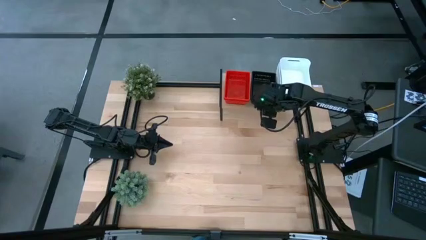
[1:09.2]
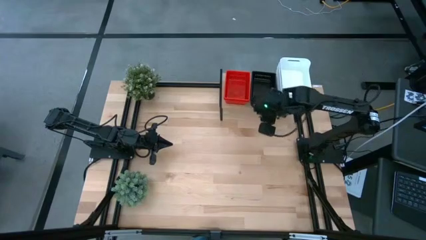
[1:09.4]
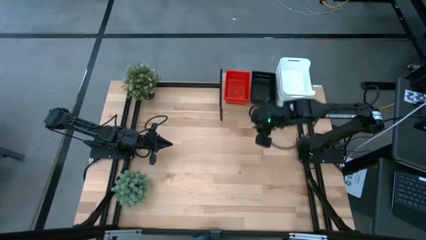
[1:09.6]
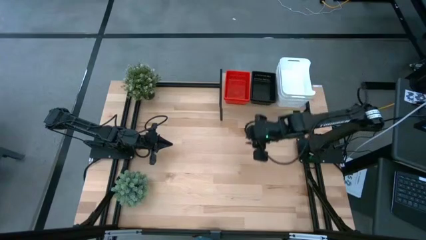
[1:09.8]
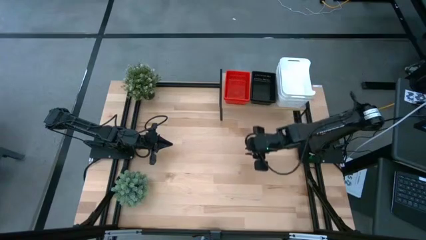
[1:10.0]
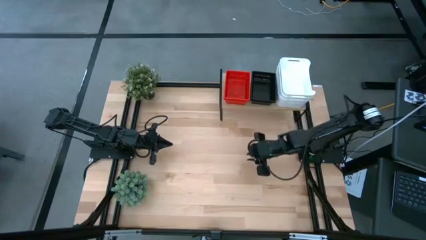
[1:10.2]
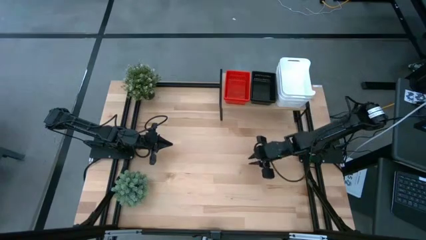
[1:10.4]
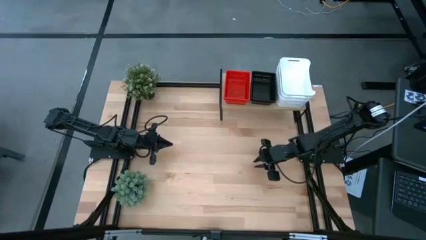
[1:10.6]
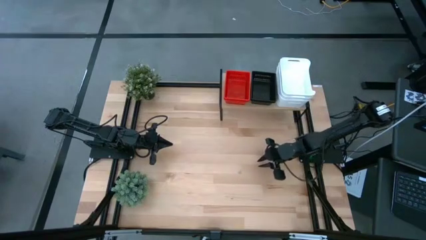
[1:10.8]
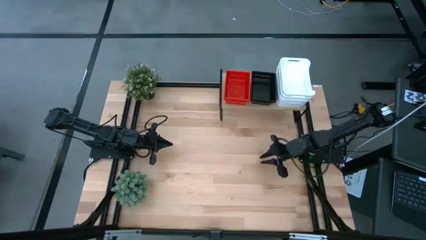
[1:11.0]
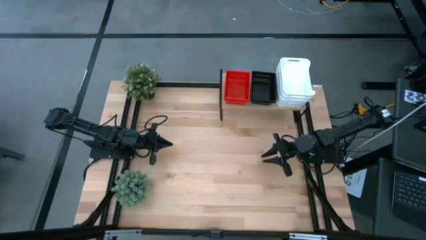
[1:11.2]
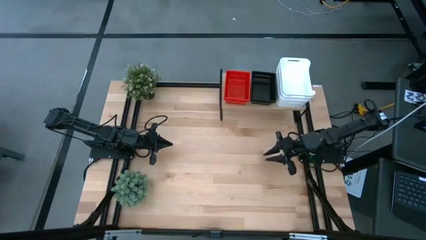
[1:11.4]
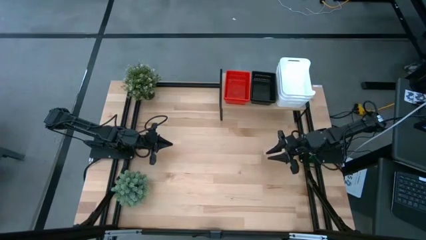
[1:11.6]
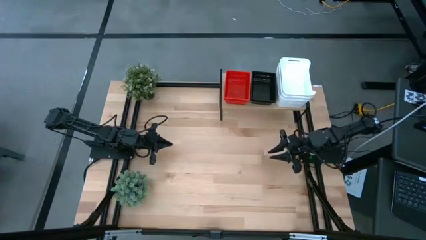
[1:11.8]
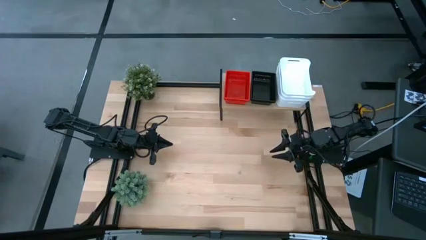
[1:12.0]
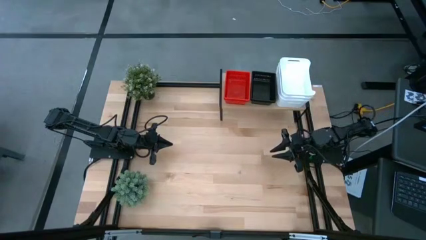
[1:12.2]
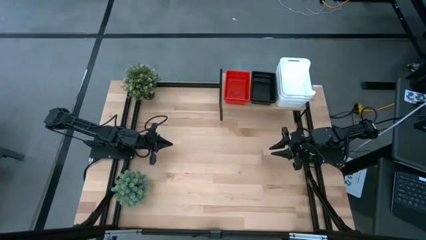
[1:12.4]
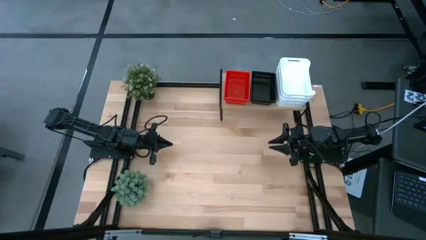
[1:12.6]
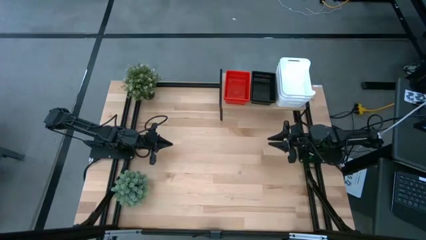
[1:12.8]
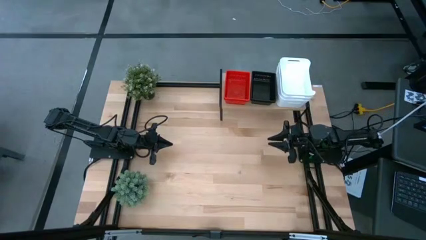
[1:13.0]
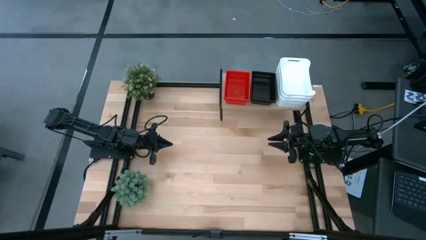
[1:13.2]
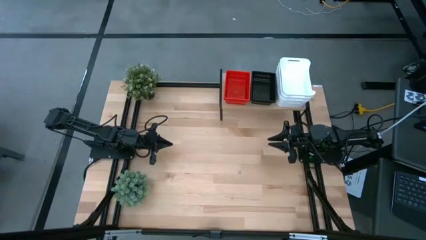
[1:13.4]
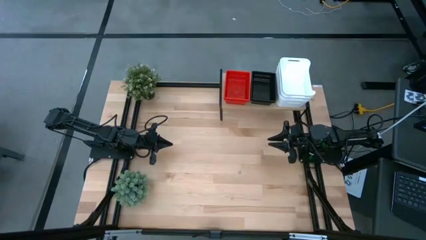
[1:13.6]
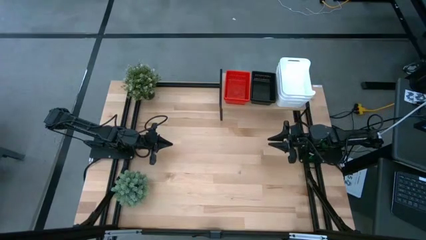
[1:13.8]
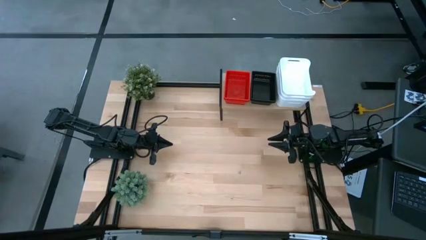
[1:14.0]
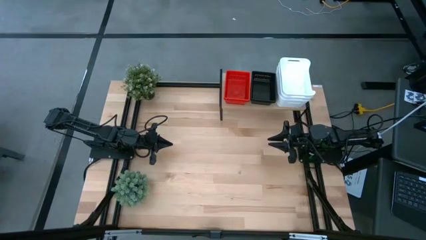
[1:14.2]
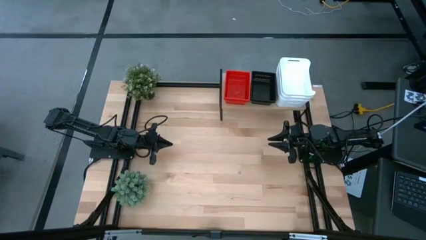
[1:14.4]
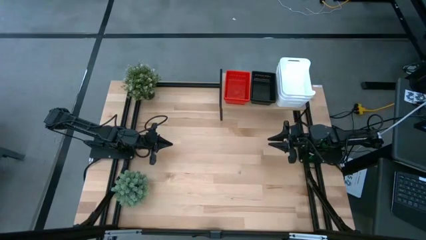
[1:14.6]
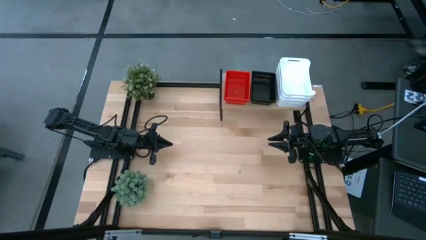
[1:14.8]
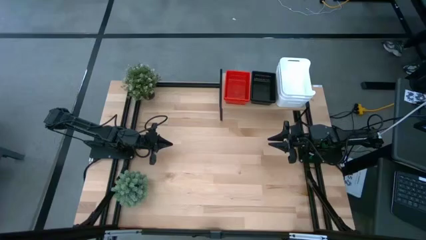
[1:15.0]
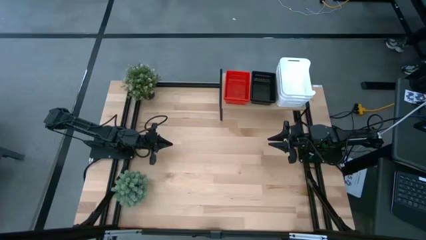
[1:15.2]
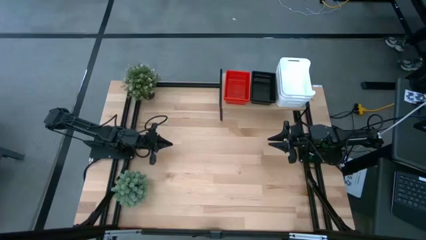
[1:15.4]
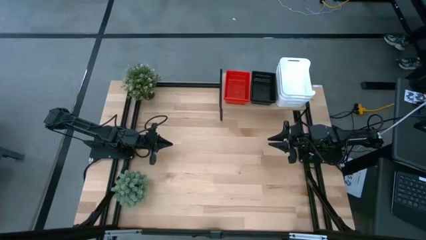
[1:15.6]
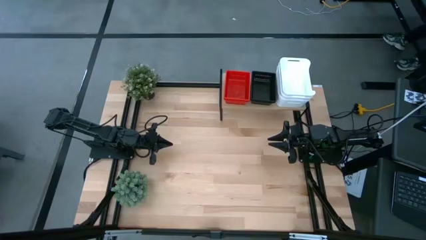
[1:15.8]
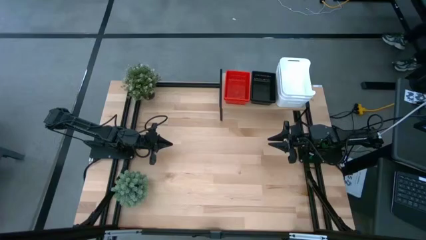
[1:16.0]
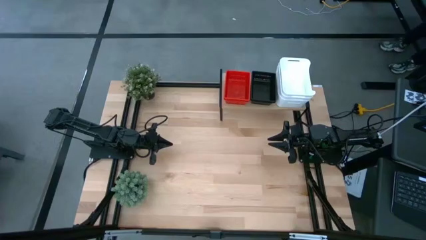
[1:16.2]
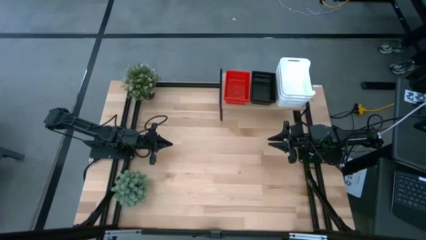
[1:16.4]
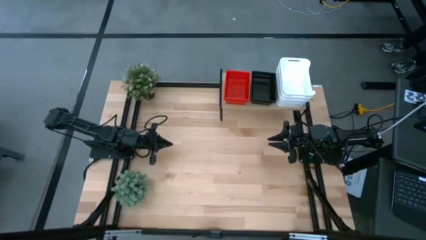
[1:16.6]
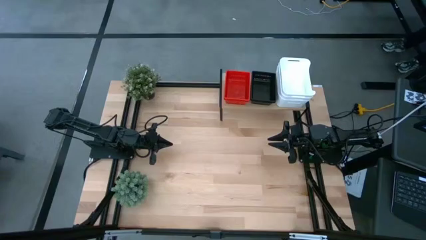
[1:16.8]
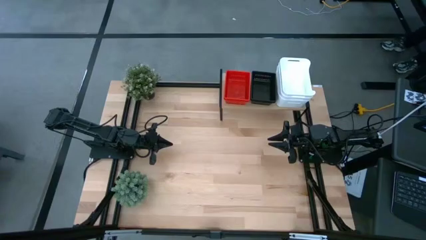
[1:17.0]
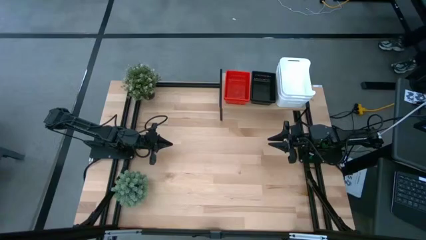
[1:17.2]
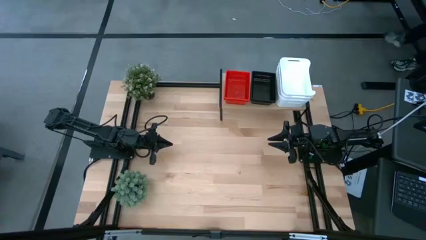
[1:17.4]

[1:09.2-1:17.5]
Task: Stack baskets on shelf by color
Return to Home Position

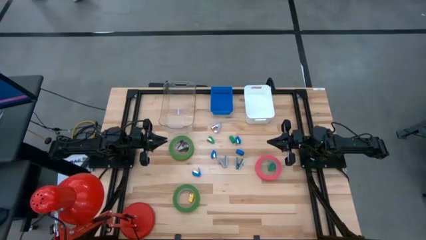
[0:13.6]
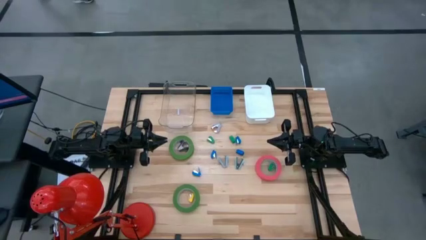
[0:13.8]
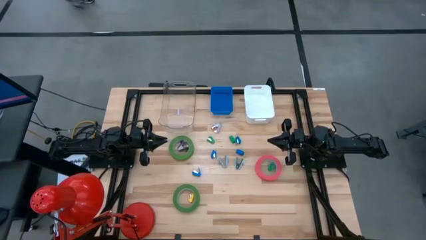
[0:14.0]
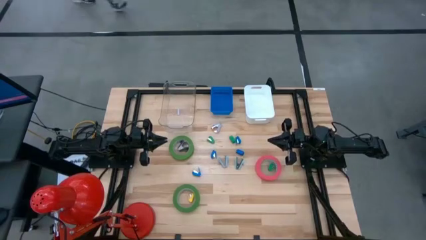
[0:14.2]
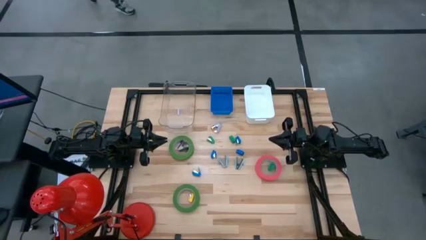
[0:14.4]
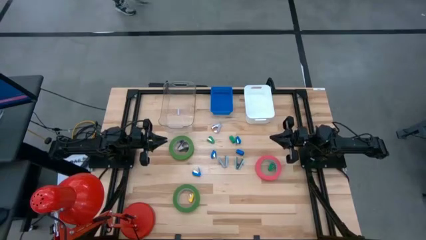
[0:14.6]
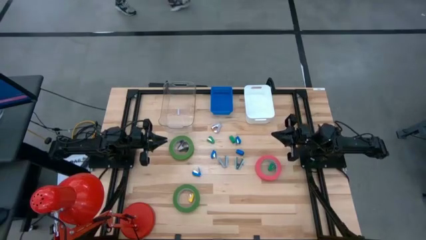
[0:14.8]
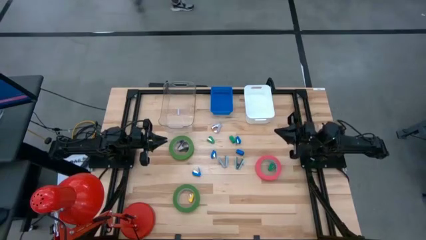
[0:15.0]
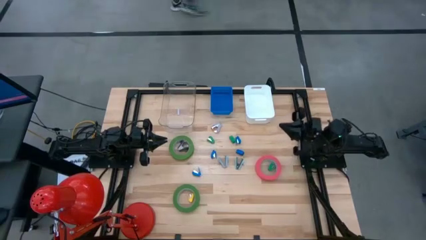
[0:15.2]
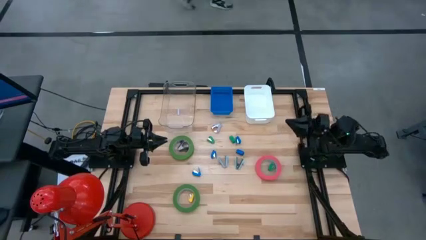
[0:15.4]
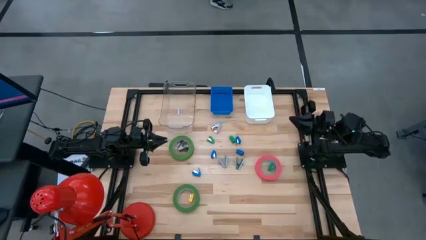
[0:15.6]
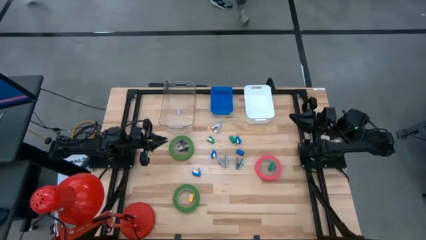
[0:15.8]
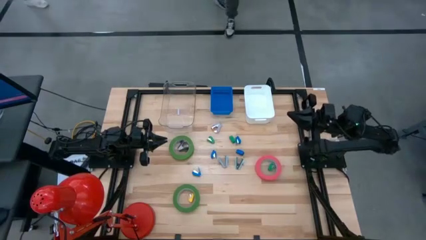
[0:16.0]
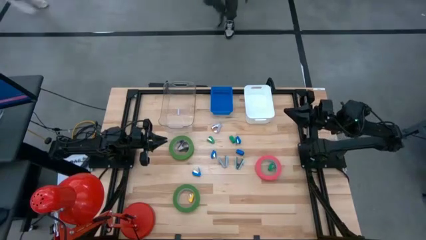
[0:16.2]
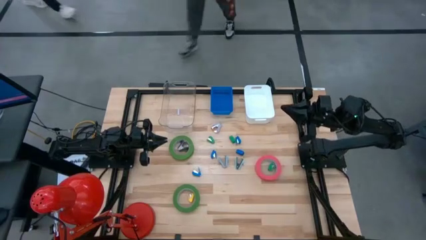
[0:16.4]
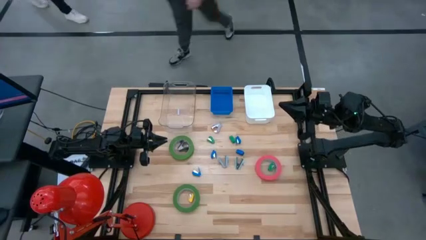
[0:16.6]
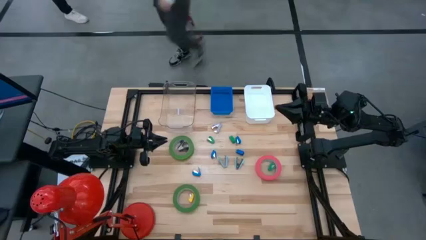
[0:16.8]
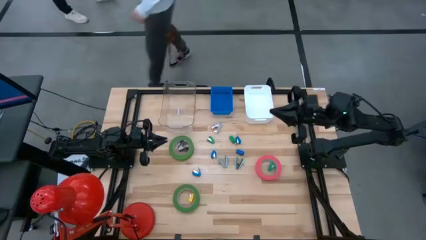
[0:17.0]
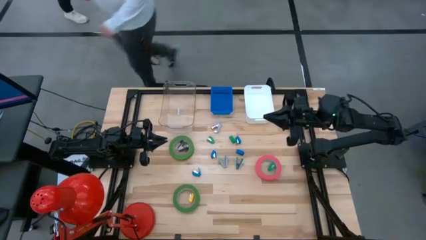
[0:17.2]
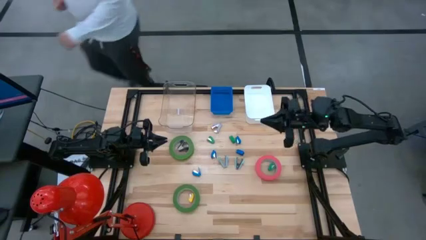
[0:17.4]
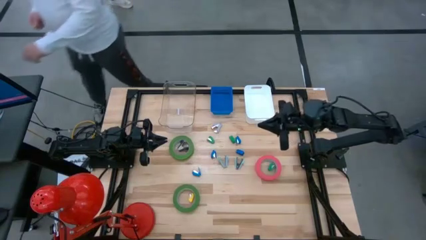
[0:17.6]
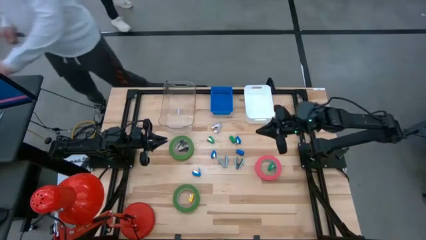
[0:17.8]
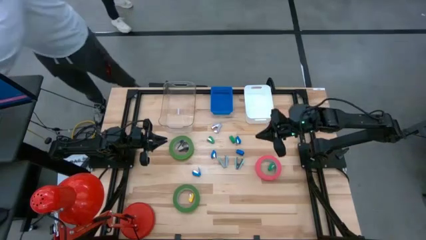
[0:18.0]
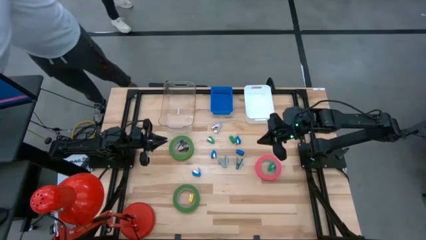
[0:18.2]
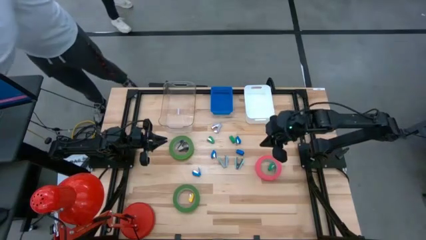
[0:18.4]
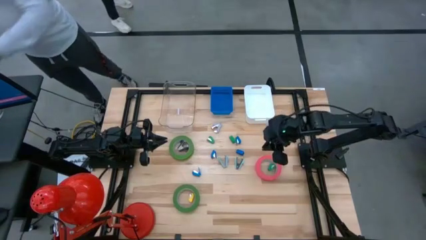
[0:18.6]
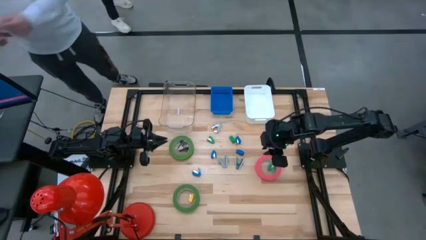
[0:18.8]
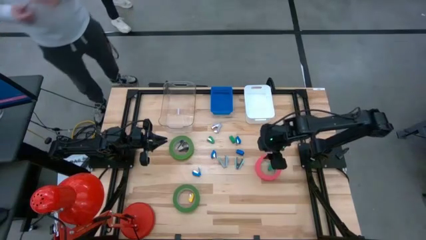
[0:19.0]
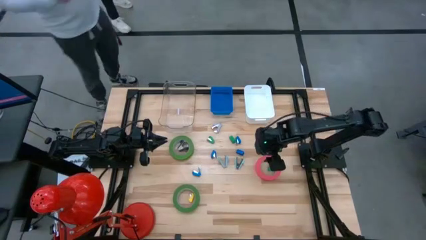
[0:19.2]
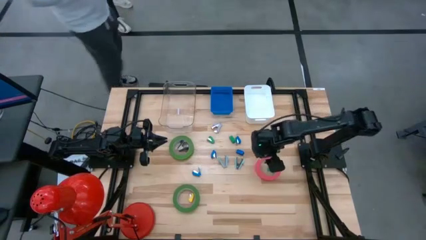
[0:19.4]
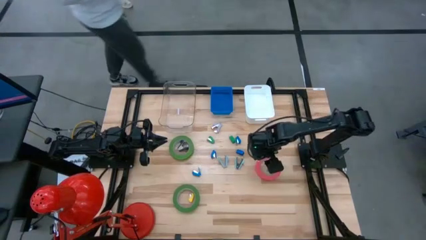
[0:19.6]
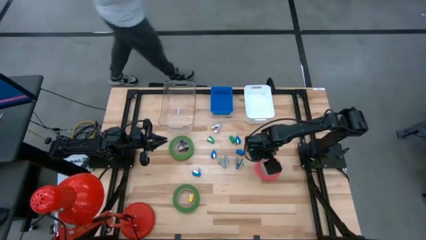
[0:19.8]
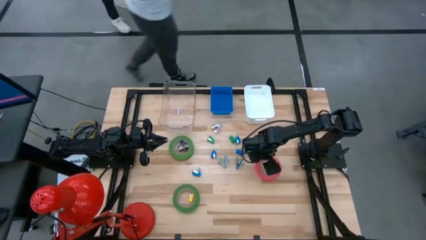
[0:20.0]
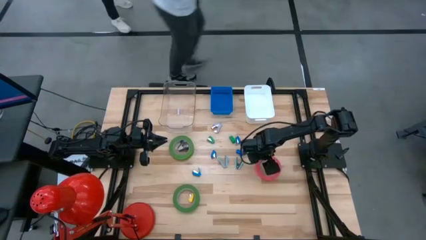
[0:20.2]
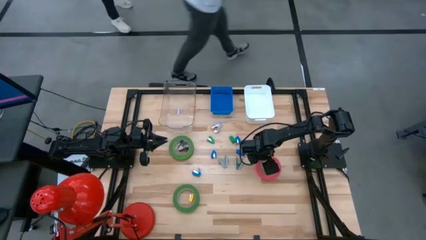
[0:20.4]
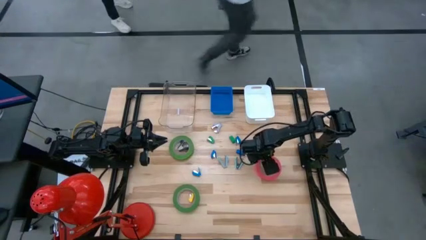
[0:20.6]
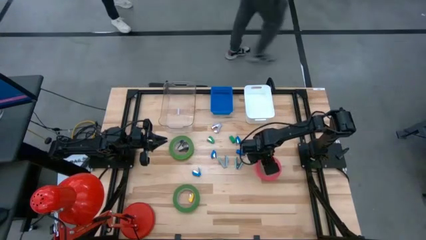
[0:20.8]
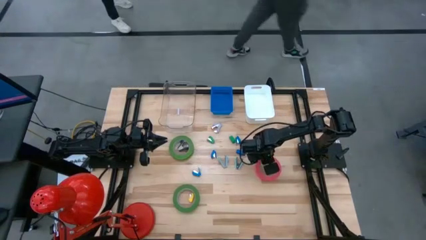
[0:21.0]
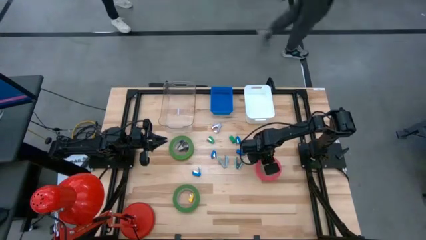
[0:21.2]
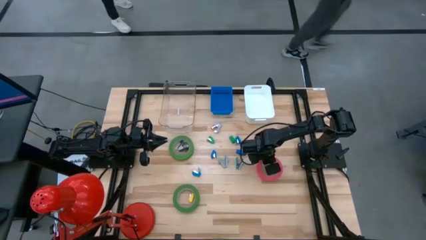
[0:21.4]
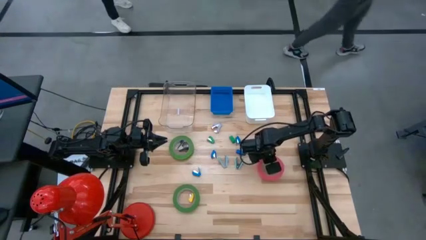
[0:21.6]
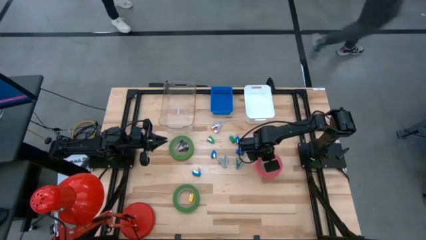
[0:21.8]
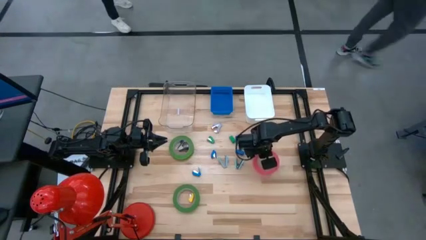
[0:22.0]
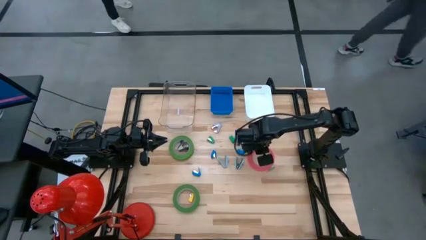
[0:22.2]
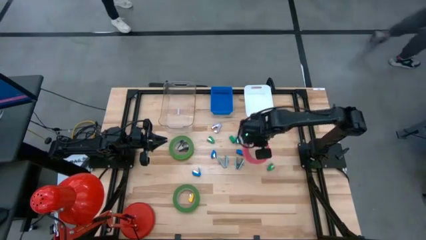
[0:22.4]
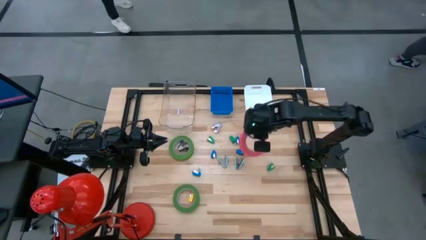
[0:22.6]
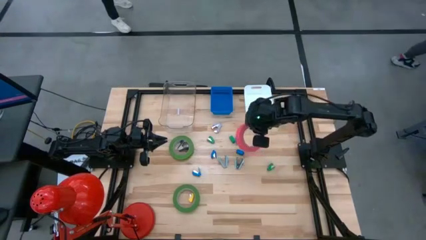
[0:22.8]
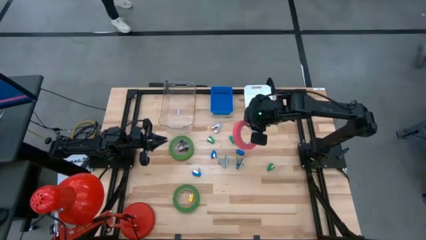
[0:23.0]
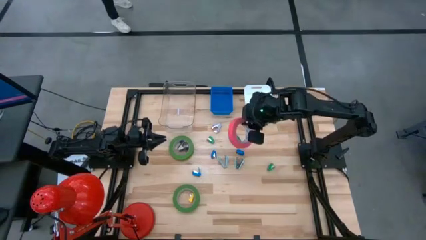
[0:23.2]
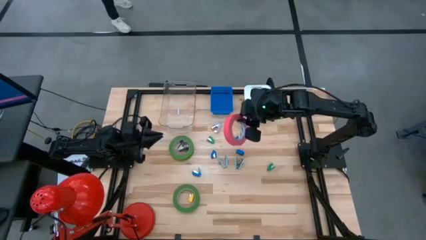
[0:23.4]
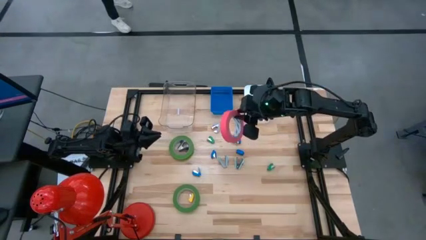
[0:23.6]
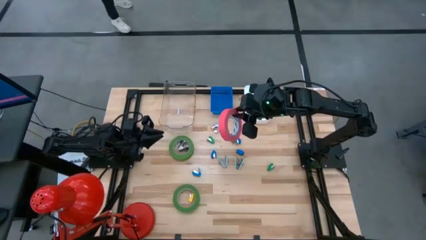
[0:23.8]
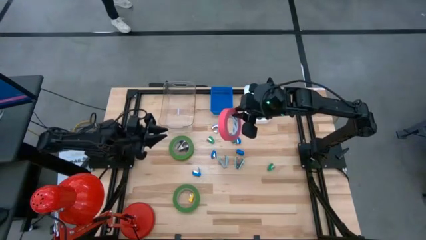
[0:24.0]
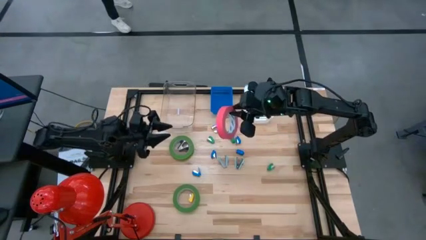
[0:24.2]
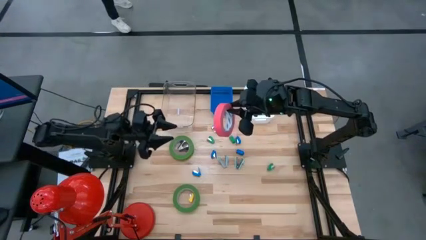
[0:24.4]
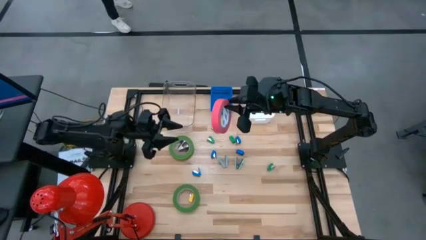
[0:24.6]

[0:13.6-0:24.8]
Task: Pick and place Stapler, Stapler remover, tape
Put the pink tape into the transparent bin
